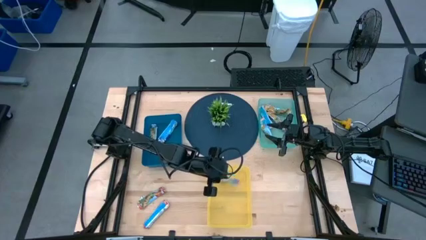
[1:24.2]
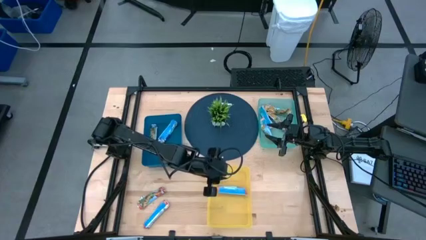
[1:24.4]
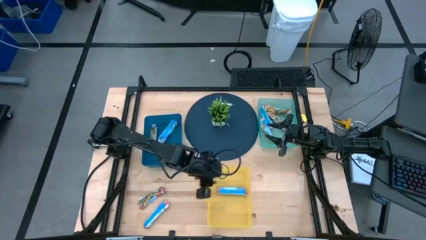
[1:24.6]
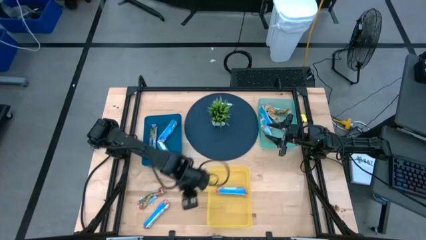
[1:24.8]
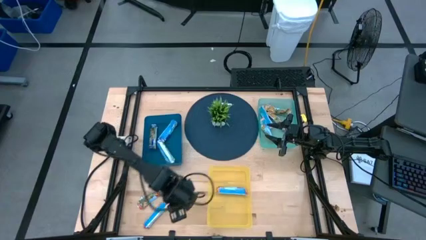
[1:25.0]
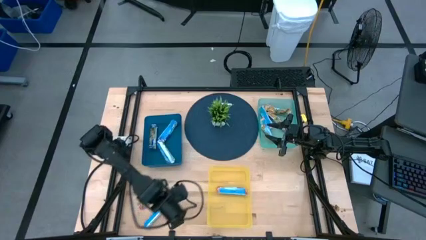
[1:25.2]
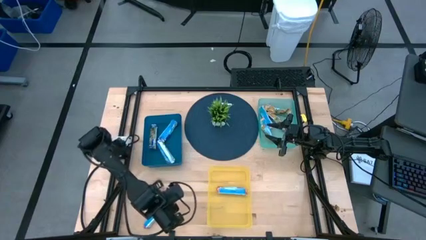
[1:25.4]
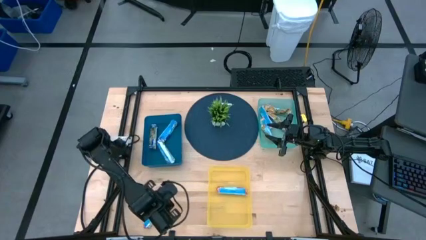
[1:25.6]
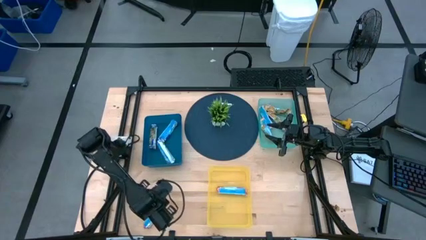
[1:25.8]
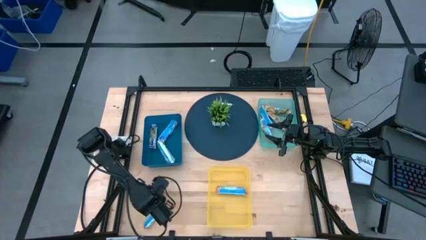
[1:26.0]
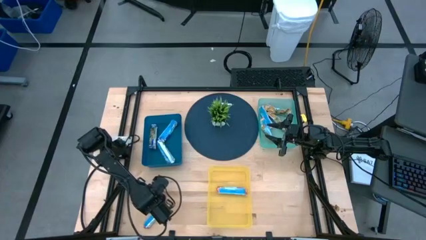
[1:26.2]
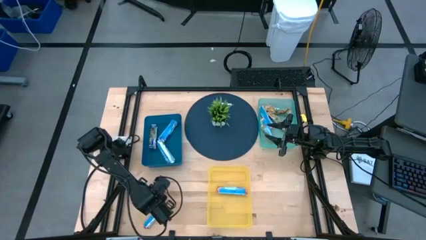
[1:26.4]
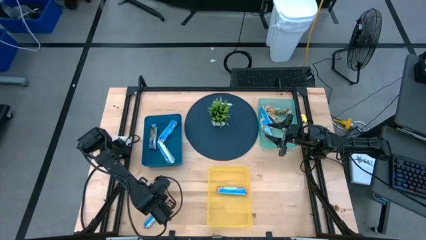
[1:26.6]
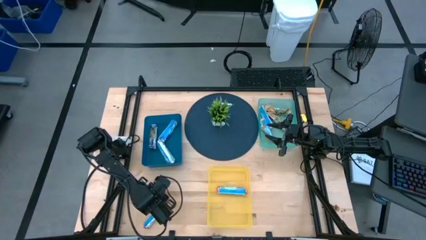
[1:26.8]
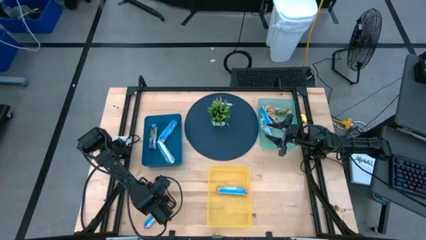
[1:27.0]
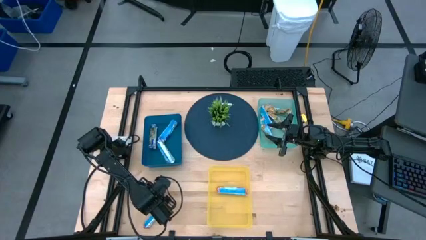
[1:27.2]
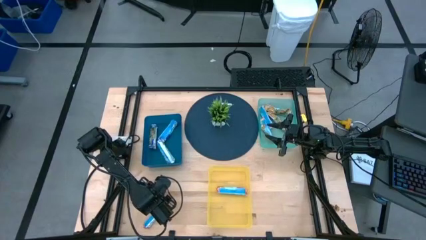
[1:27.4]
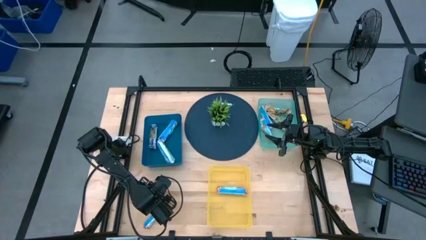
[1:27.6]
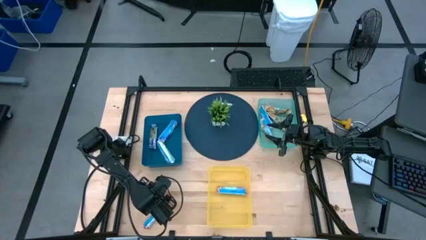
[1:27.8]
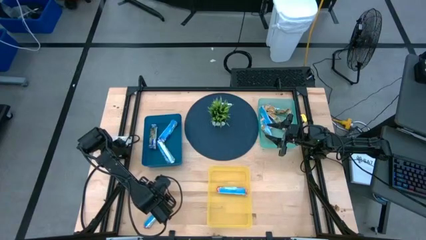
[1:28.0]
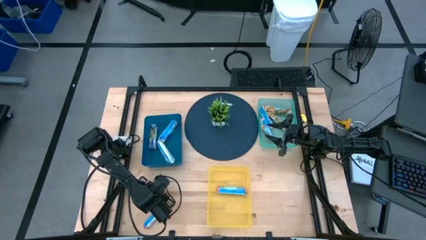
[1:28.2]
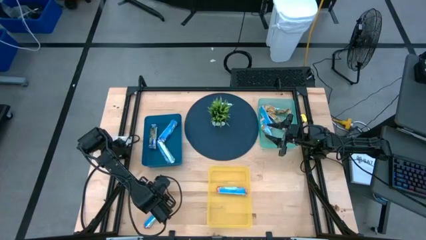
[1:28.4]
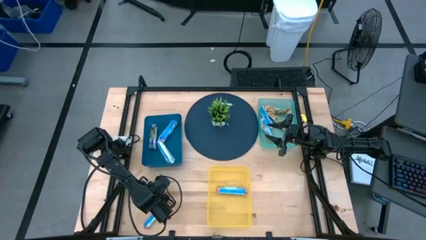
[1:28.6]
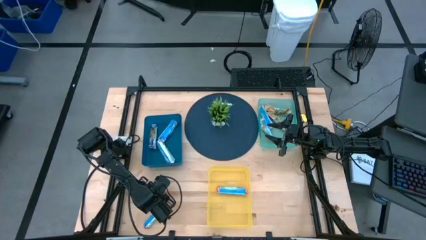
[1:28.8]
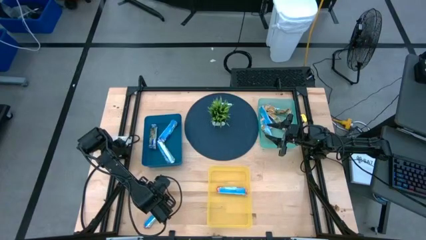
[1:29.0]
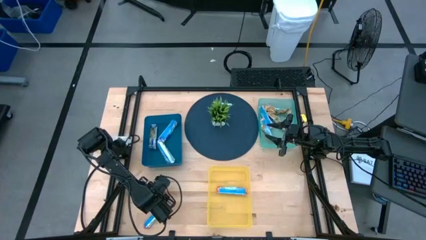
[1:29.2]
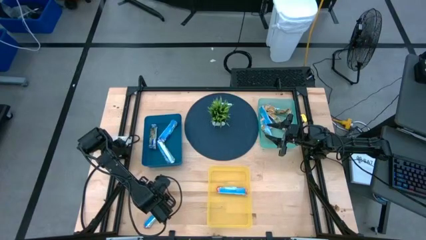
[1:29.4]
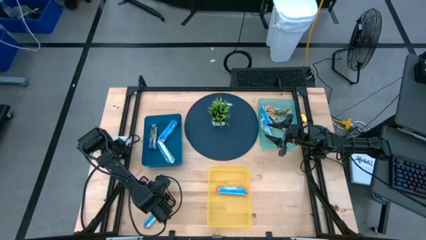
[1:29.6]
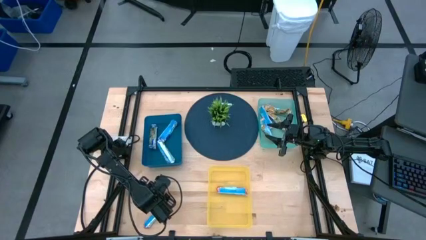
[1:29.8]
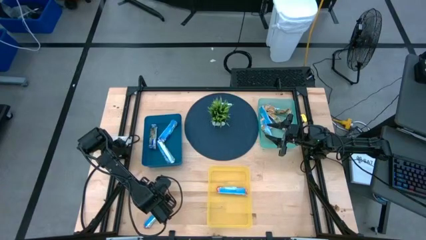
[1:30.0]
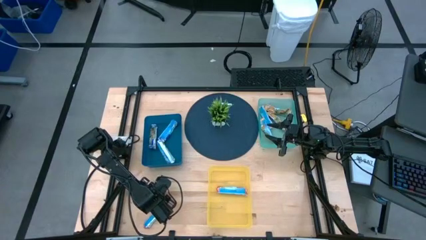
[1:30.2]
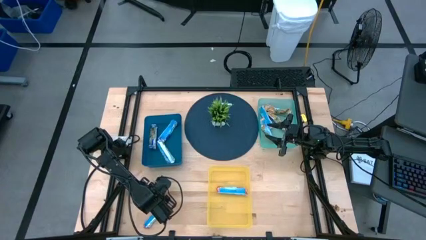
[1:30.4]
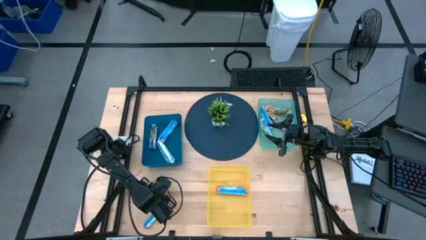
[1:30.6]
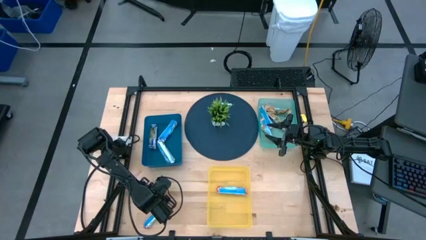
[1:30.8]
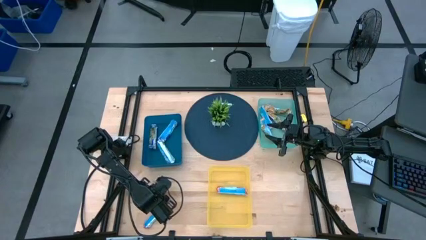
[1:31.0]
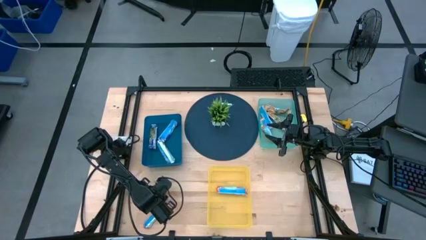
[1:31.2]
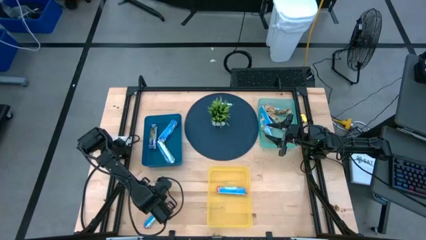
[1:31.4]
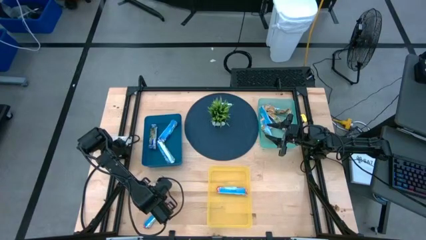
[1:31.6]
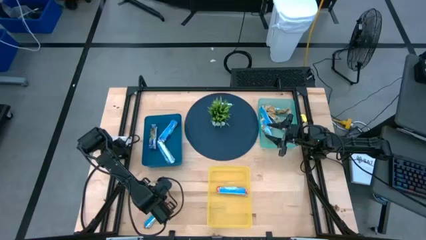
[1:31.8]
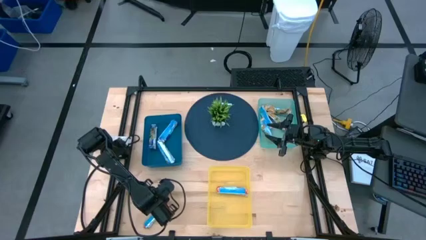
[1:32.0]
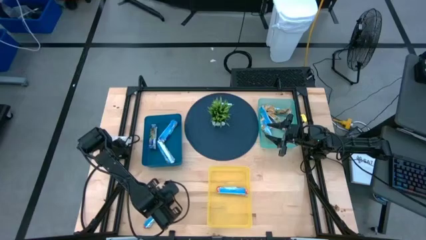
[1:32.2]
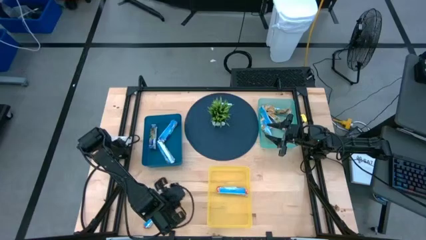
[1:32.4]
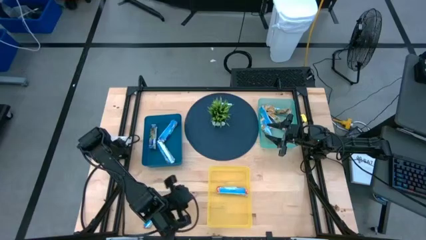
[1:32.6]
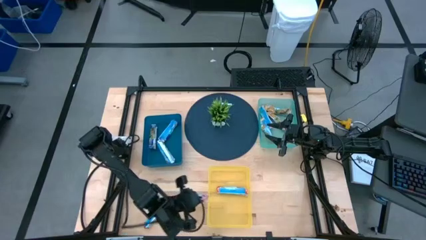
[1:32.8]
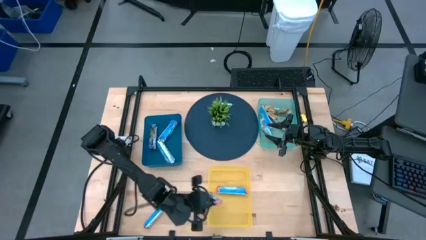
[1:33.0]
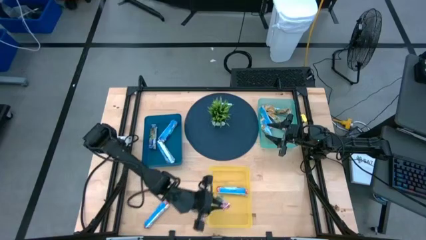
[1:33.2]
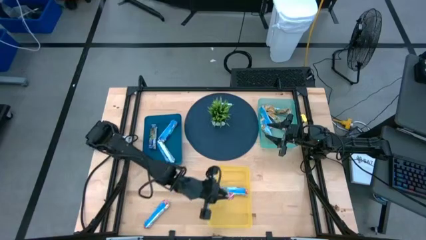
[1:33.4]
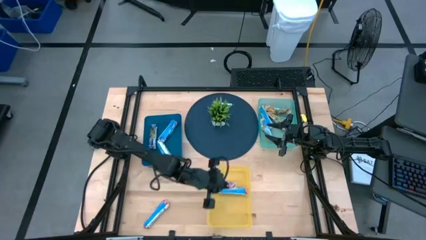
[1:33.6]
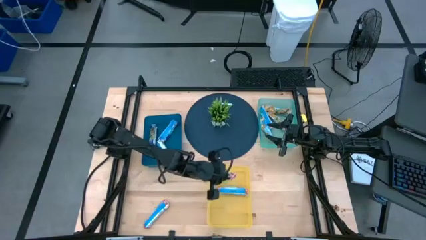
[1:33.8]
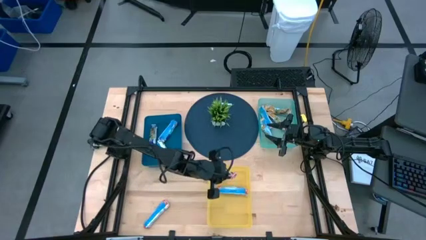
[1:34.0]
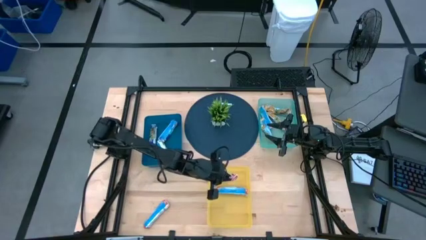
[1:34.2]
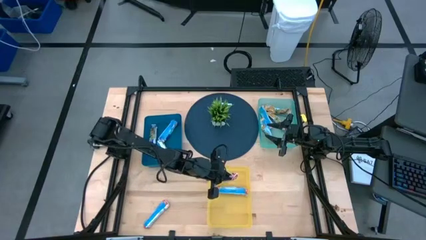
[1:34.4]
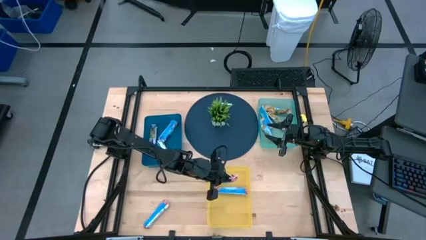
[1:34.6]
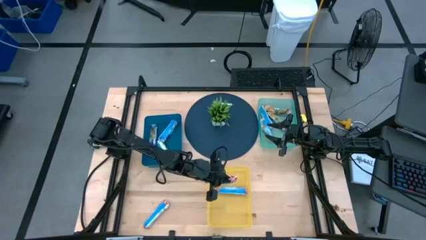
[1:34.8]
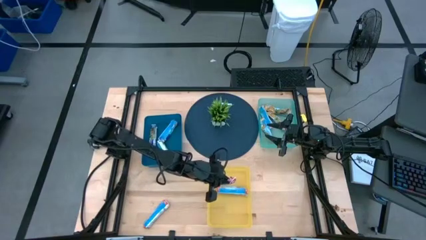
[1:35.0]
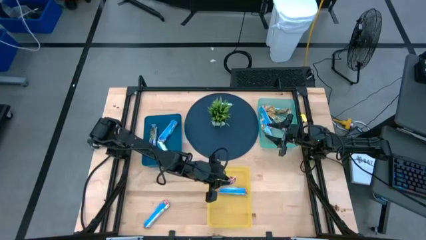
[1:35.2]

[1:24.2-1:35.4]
Task: Pick and place Granola Bars by type
Put the red granola bar into the yellow bin
